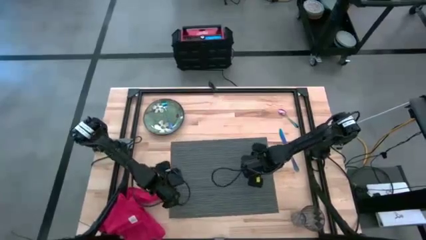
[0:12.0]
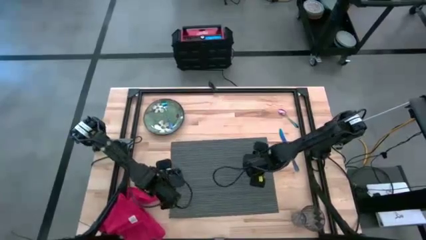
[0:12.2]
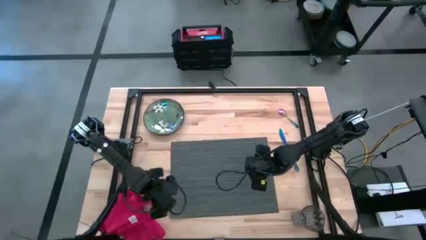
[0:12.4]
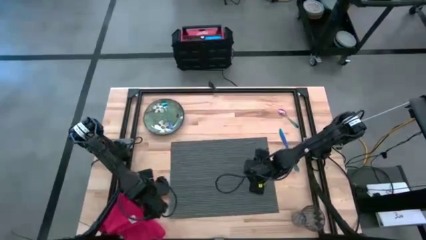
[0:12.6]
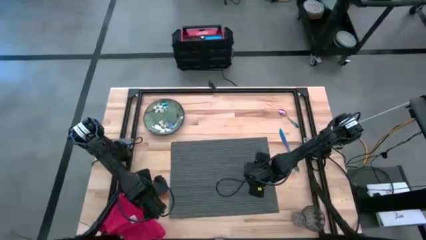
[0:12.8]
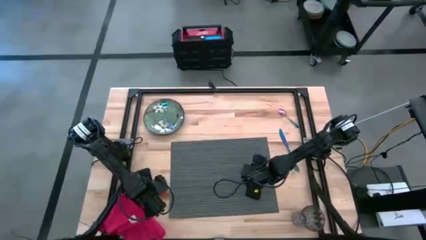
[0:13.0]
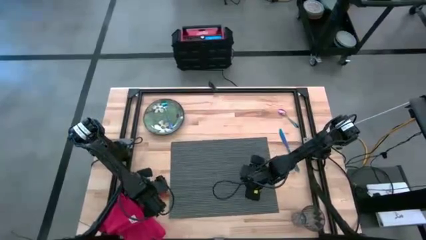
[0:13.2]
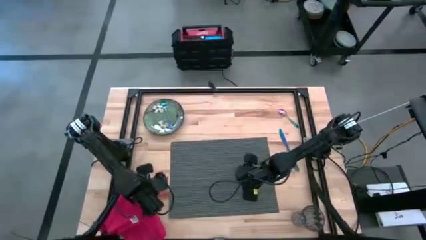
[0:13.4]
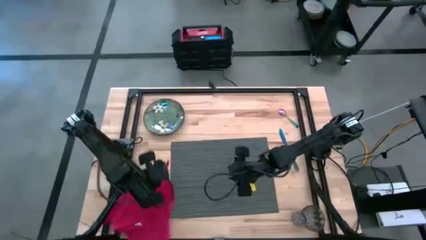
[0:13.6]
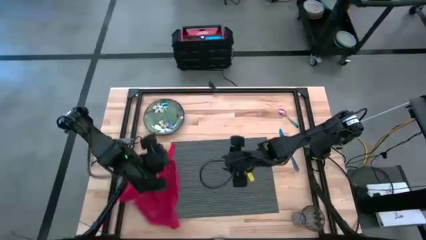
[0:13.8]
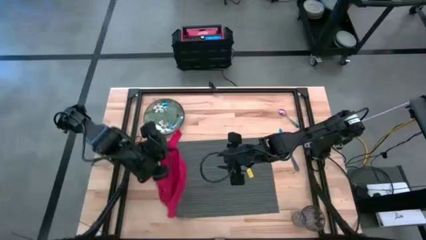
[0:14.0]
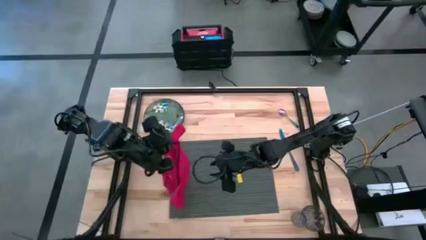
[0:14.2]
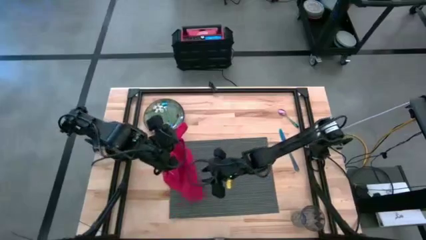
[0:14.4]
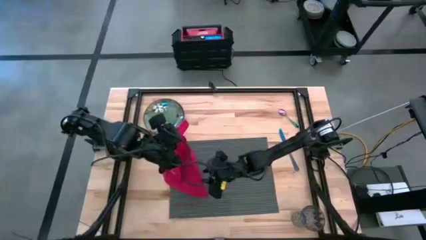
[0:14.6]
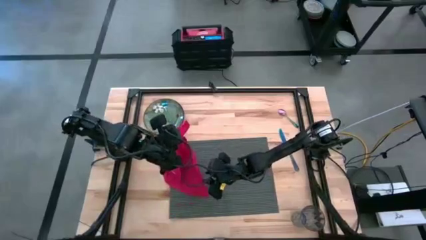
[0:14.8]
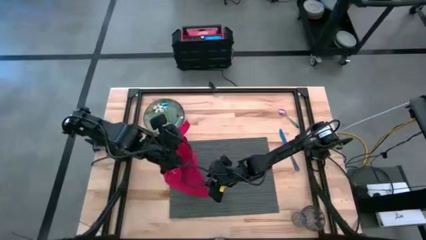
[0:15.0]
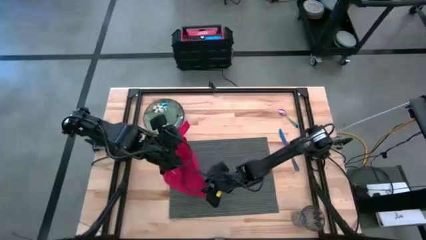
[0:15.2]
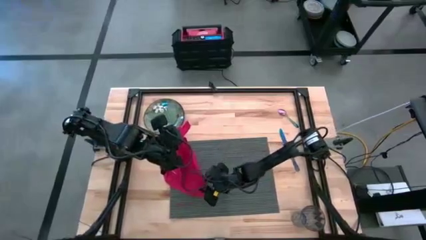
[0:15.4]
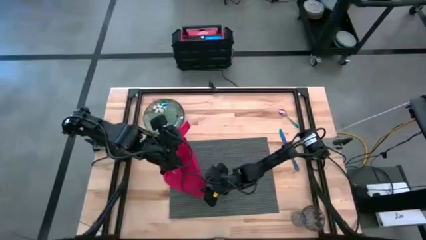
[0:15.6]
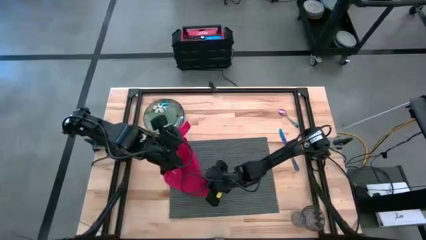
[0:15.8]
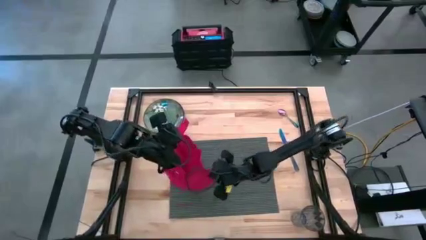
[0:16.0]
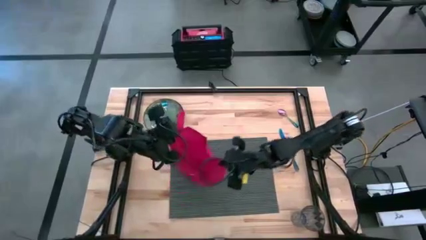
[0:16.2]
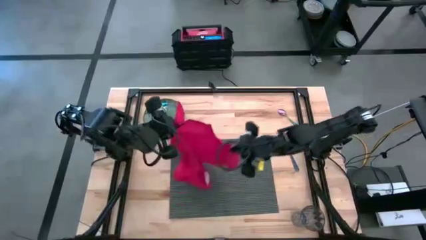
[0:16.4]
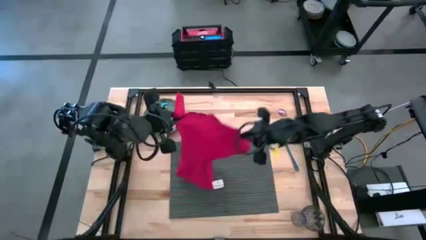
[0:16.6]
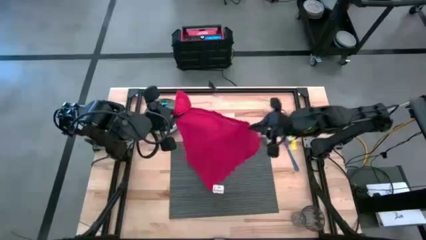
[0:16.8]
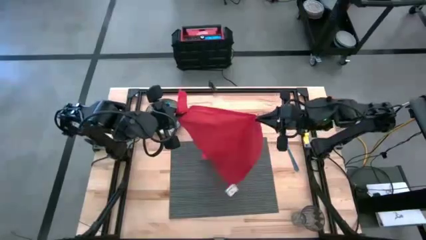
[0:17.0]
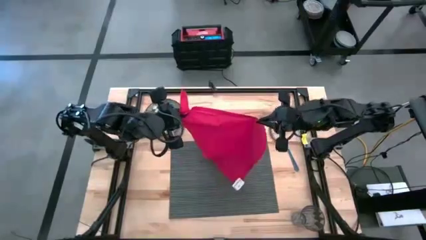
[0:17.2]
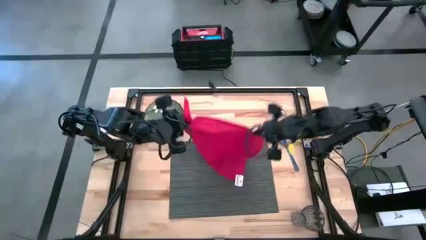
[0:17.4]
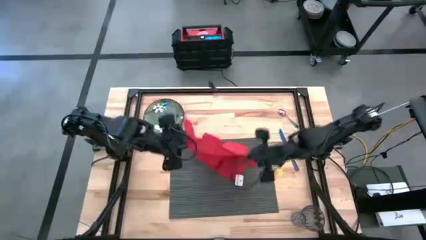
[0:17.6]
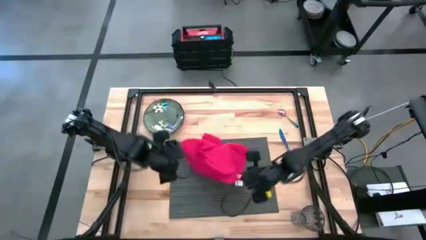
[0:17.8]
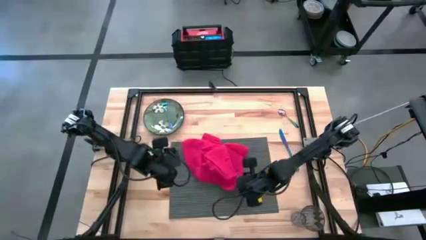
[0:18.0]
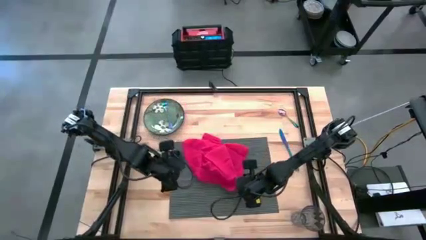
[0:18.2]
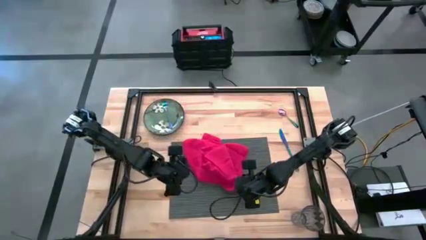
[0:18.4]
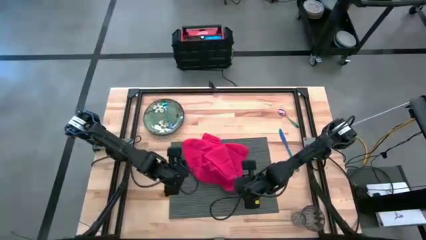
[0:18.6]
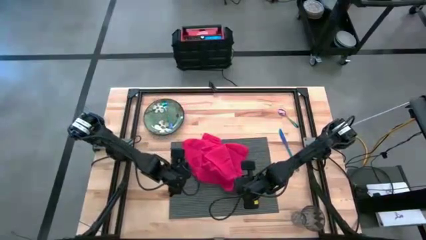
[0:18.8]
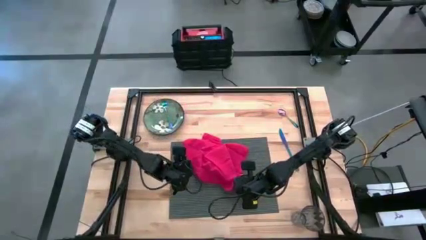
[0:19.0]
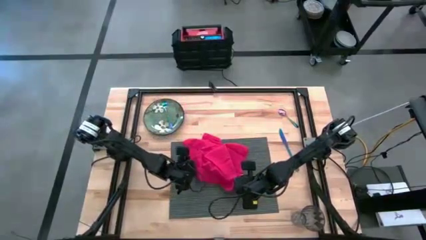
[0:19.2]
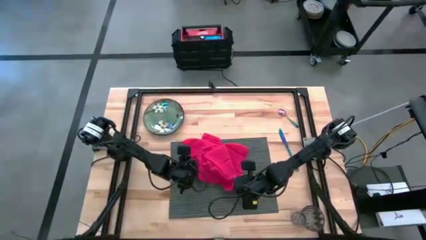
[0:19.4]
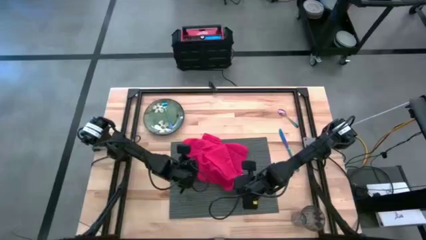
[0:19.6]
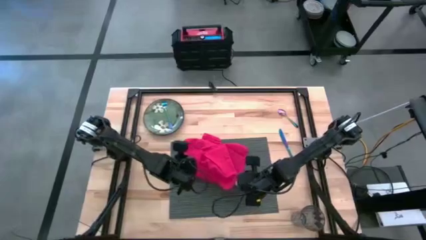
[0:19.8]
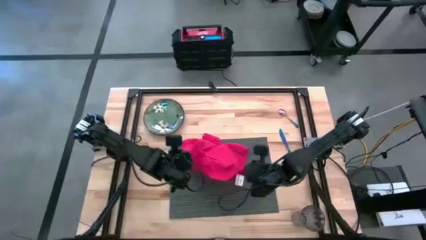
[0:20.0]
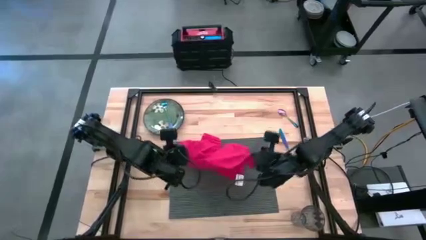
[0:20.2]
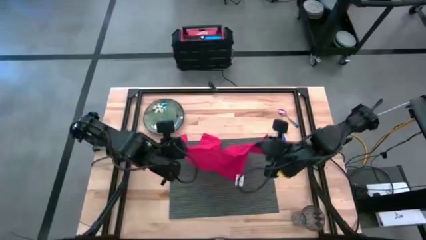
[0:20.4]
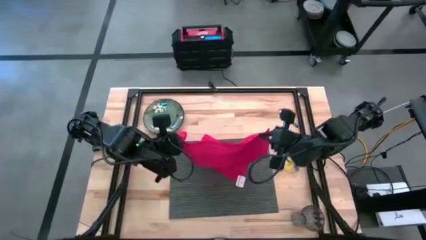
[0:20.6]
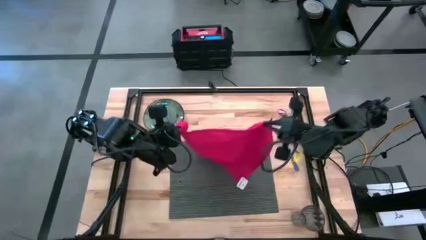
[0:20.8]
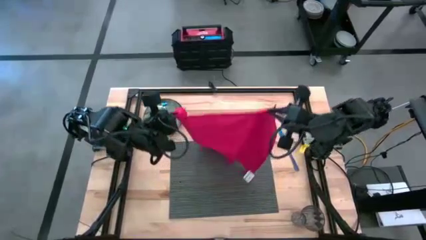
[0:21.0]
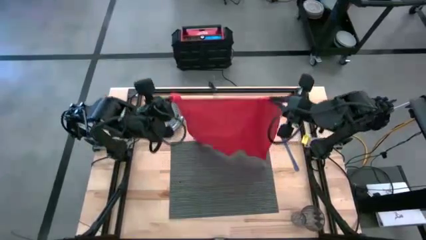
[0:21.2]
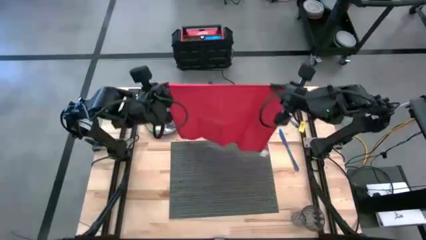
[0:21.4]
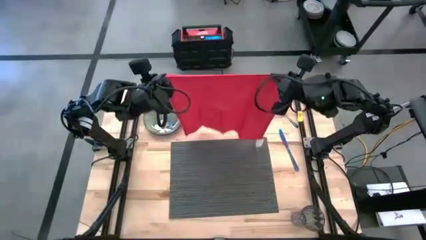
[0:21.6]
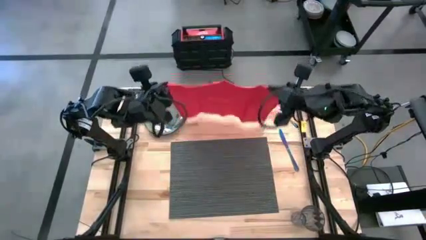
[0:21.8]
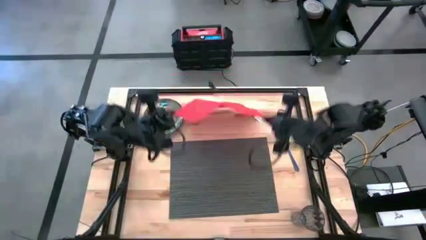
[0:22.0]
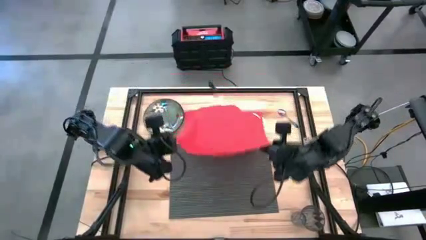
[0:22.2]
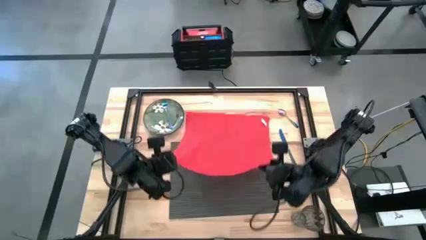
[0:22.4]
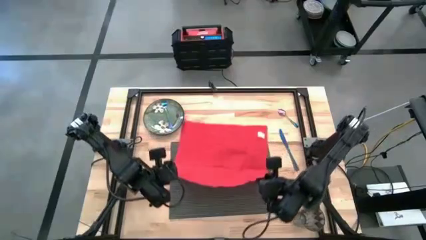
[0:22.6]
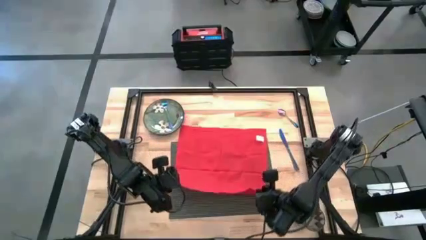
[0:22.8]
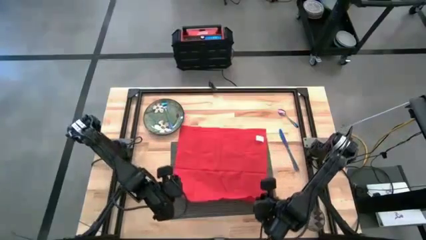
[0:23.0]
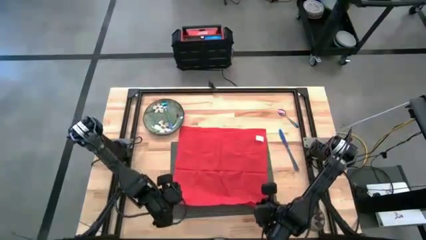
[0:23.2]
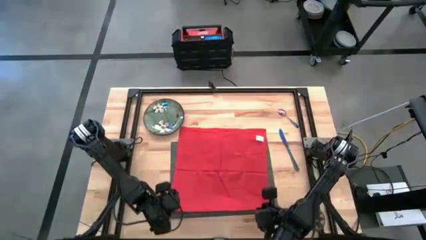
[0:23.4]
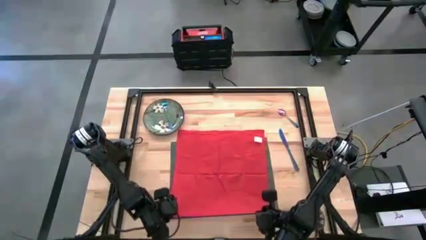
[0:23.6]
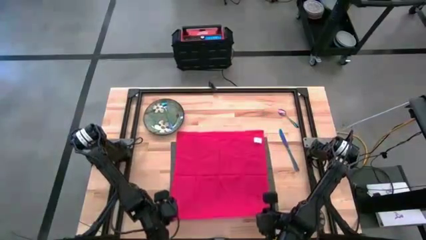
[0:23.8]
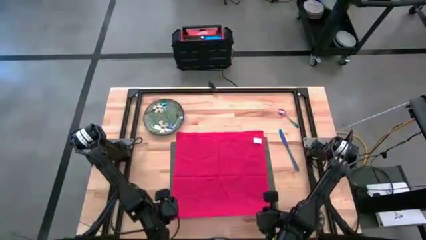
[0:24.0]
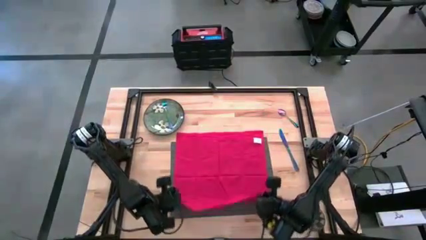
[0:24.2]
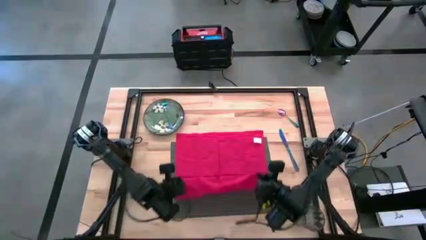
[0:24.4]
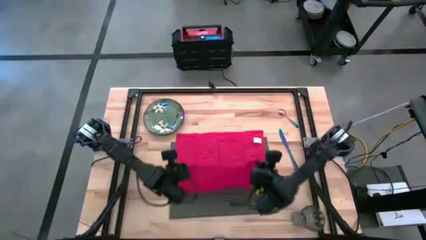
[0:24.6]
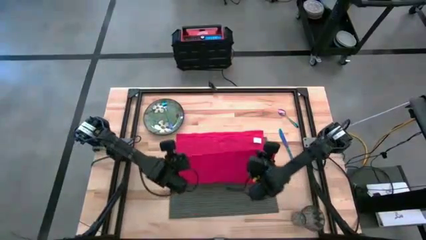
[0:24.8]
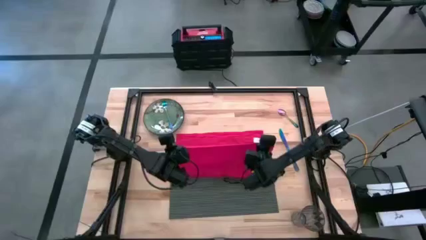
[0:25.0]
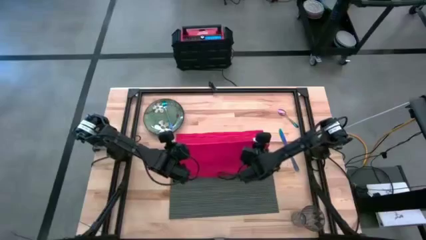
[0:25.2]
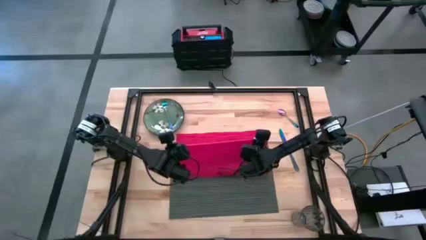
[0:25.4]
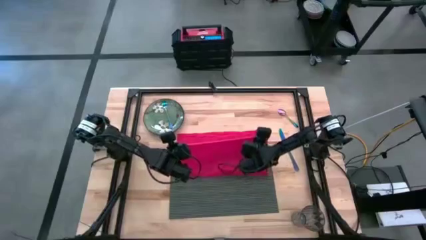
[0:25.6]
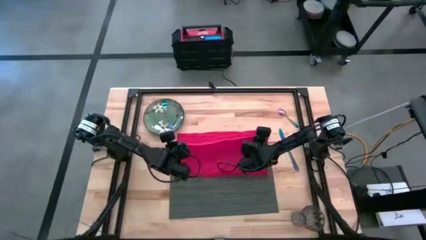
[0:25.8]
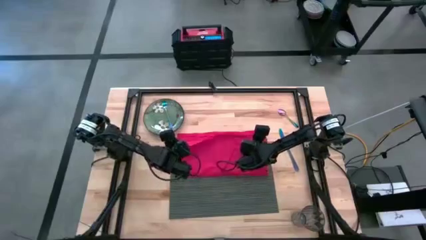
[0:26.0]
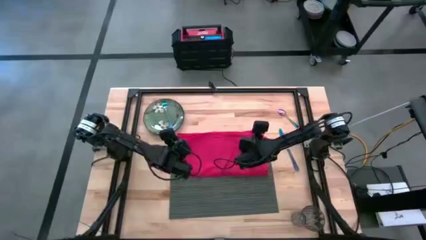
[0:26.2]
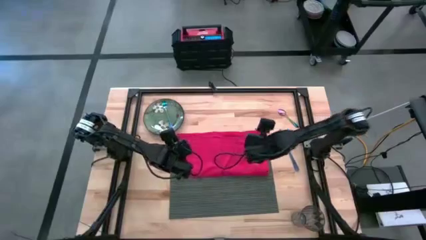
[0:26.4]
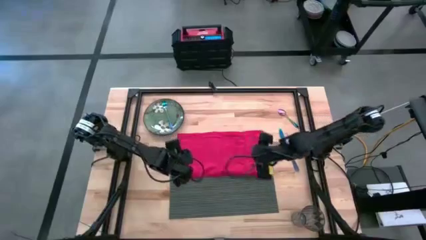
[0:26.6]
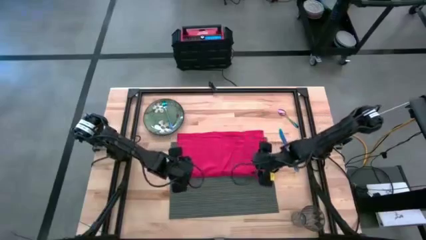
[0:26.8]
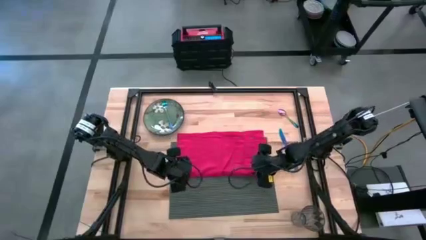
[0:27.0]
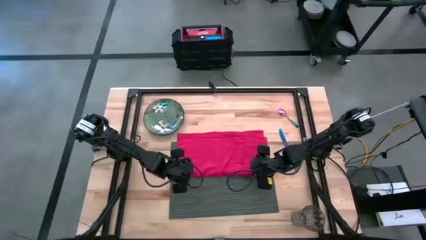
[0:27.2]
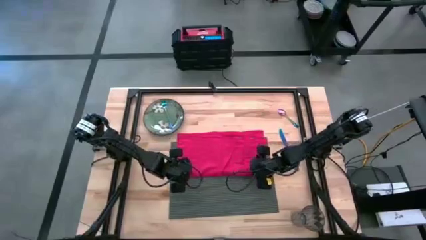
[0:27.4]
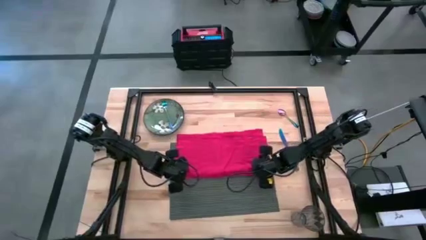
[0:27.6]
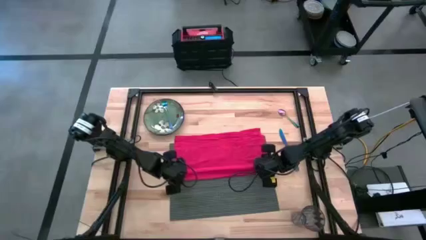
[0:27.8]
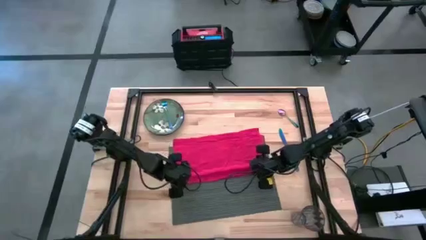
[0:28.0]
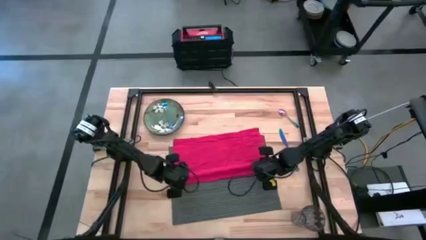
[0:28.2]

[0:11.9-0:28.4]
Task: Set table place
Fold the red table napkin
